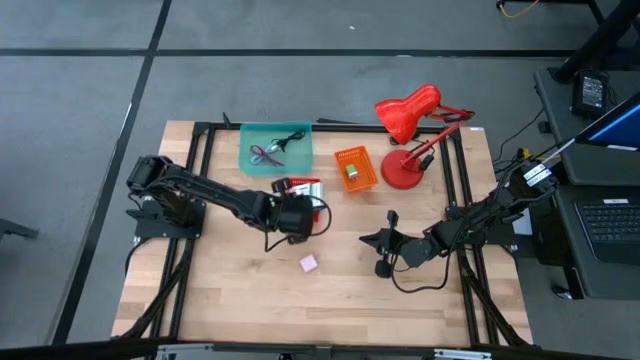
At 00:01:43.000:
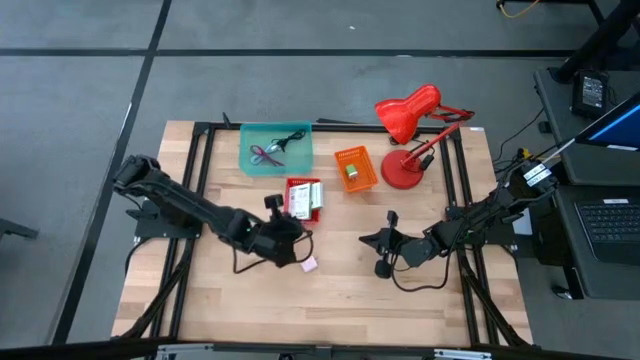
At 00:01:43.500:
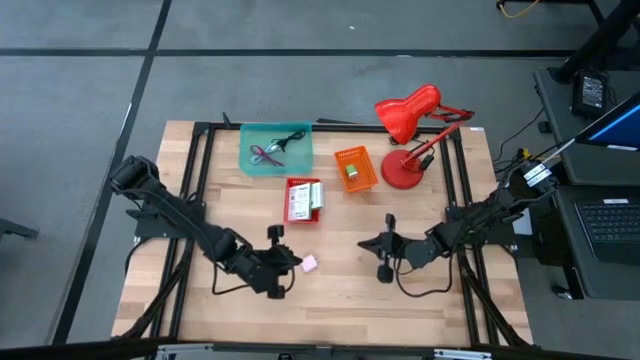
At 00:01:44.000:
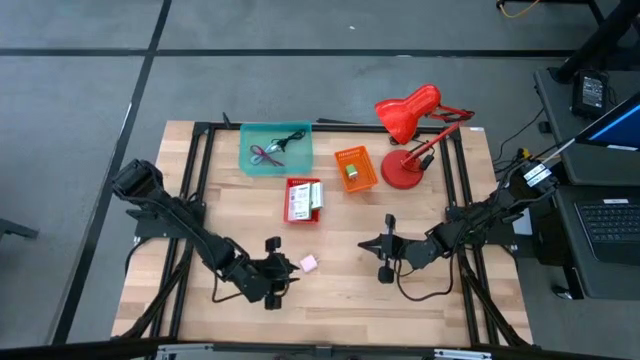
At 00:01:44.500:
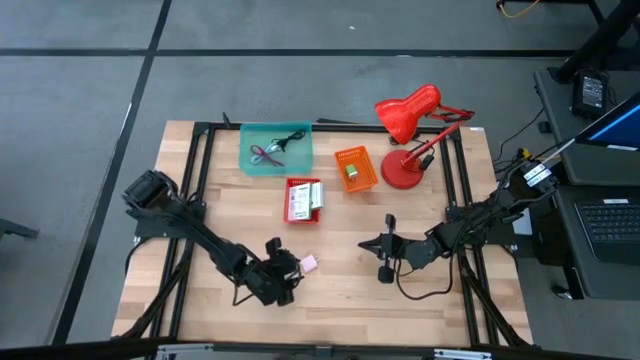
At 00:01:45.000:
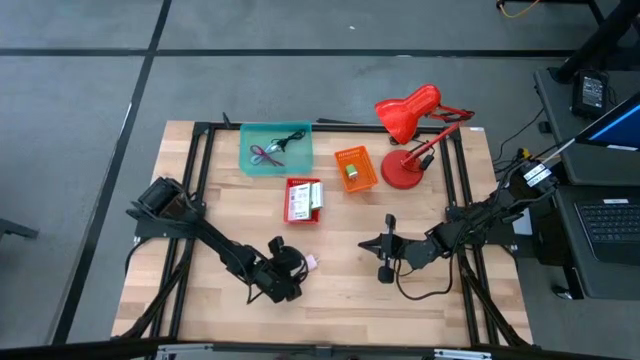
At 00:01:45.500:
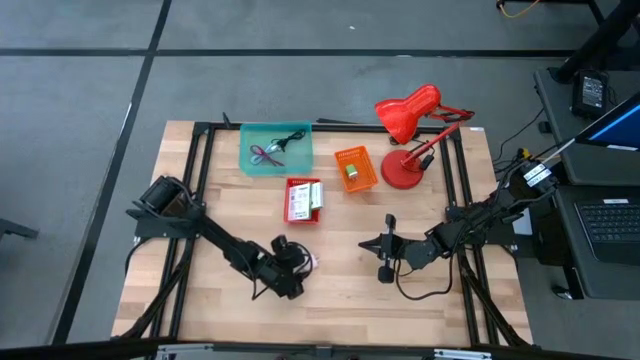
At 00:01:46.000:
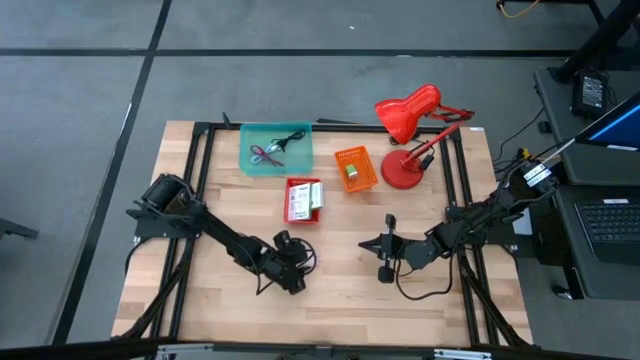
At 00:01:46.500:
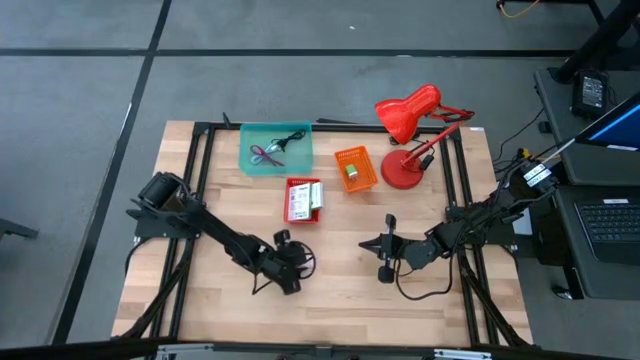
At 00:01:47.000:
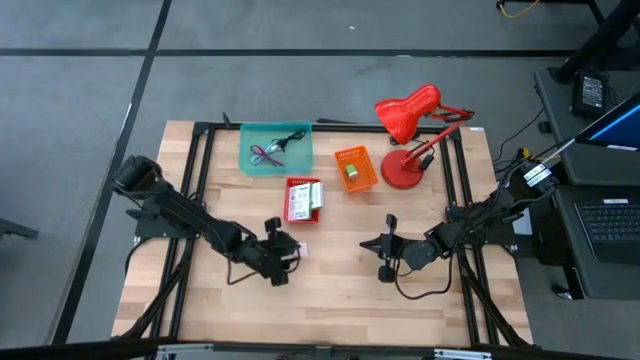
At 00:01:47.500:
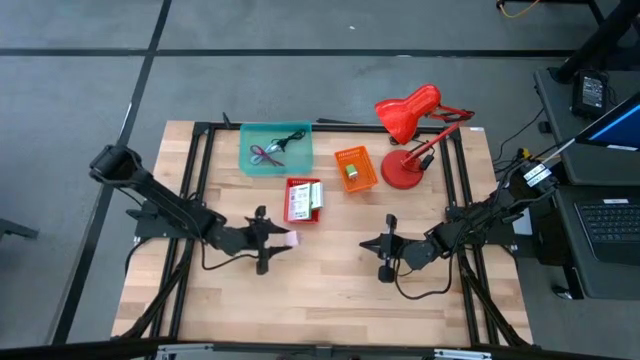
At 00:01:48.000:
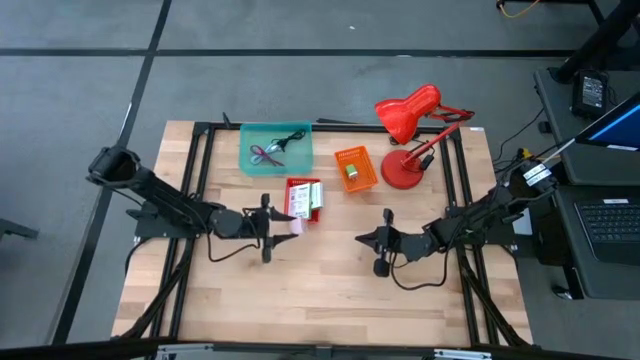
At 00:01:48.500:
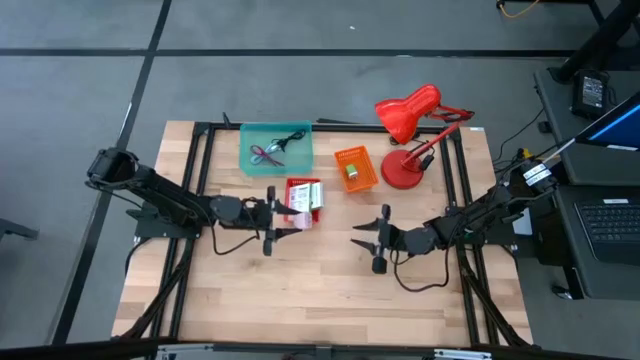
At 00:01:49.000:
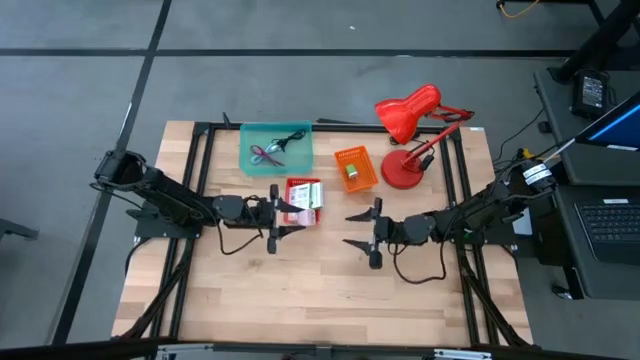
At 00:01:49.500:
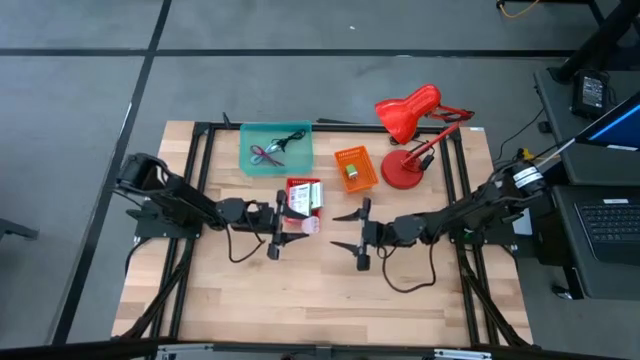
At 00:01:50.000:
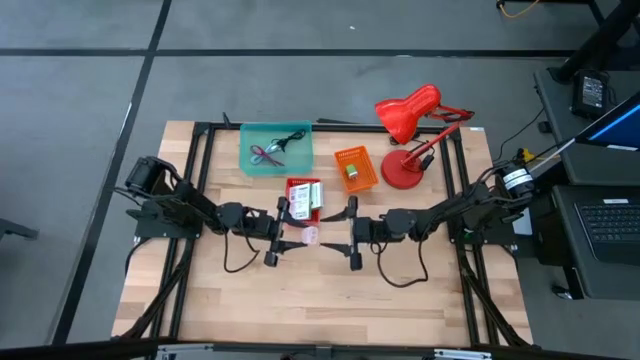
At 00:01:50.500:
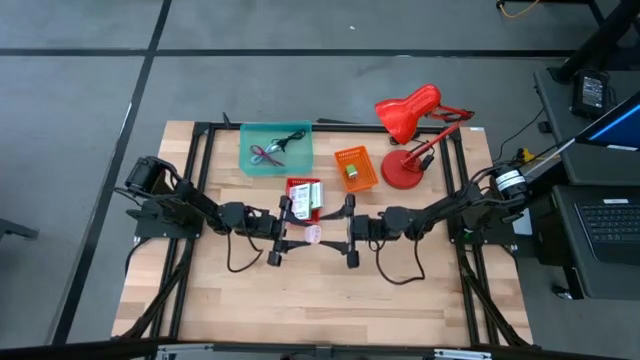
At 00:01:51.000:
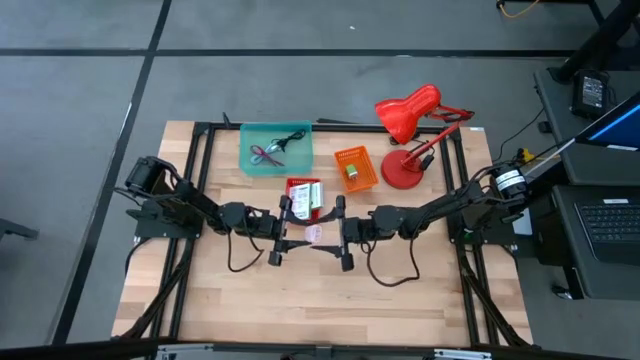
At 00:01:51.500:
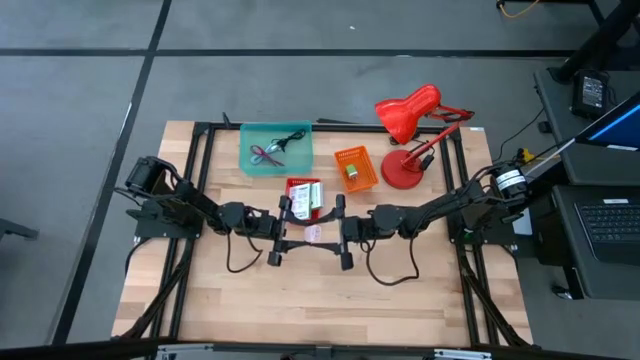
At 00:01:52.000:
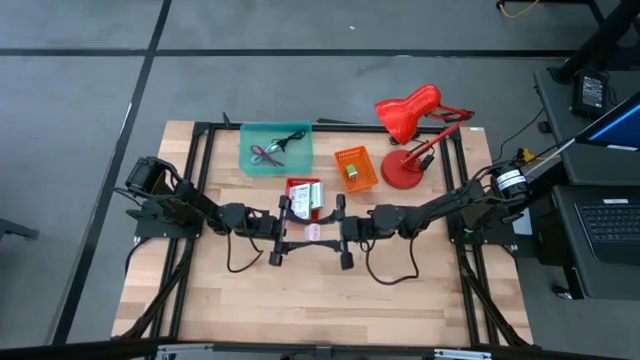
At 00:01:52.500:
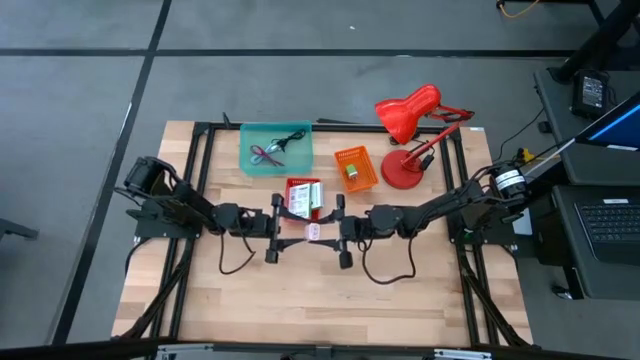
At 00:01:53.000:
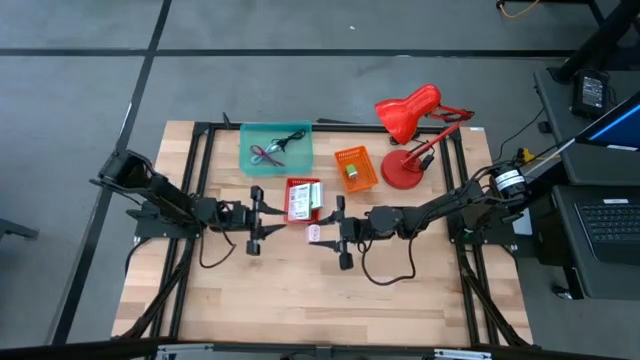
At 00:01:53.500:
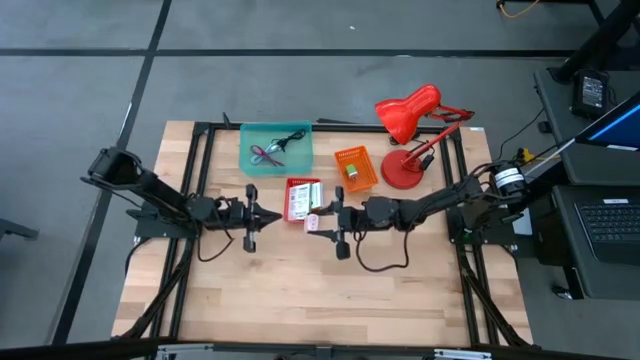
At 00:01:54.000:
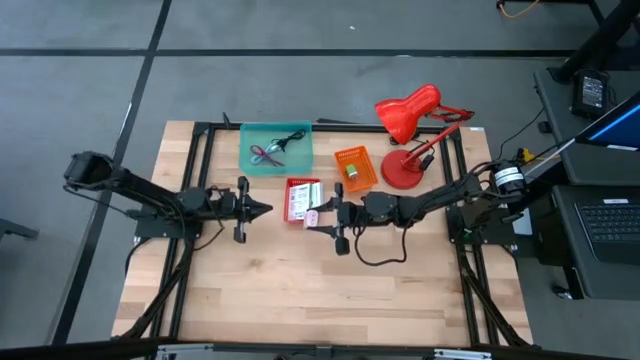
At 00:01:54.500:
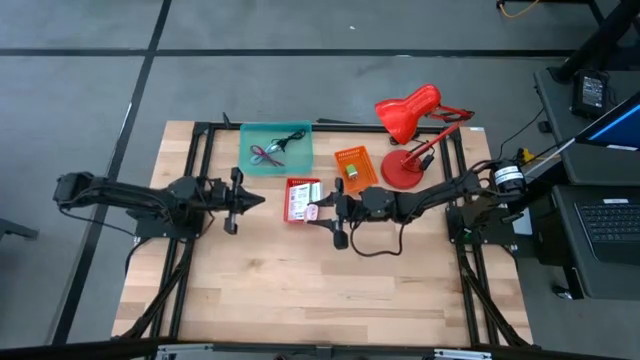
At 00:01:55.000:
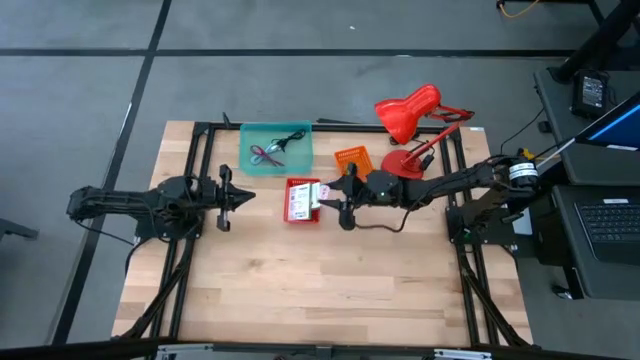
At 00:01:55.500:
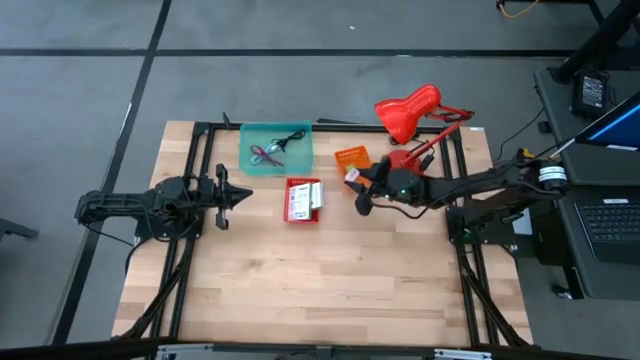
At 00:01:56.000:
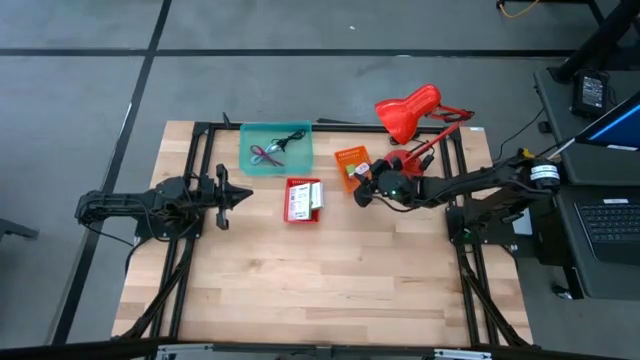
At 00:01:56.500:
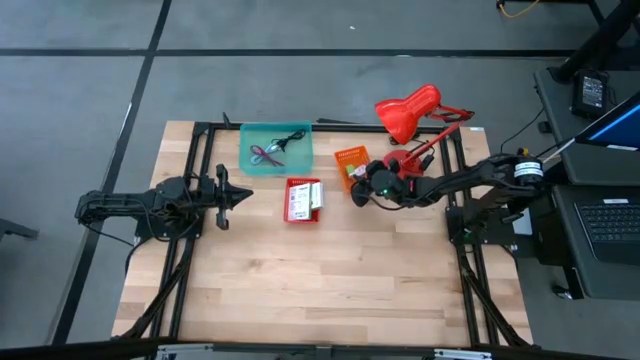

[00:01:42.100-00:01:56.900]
Task: Pick and place items into bin
Put the white charger adapter into the orange bin

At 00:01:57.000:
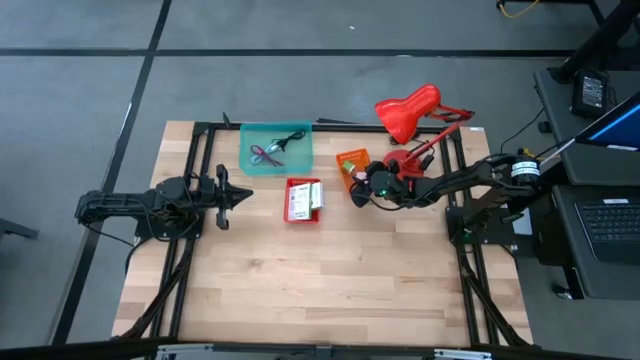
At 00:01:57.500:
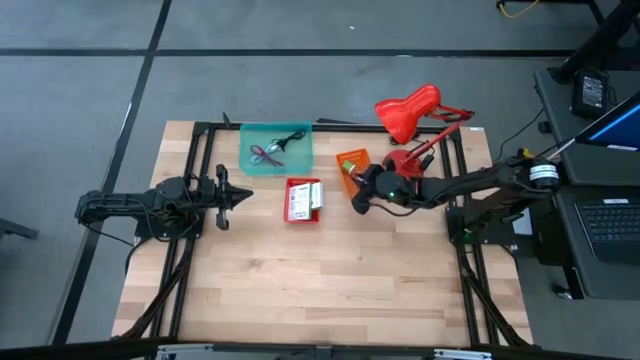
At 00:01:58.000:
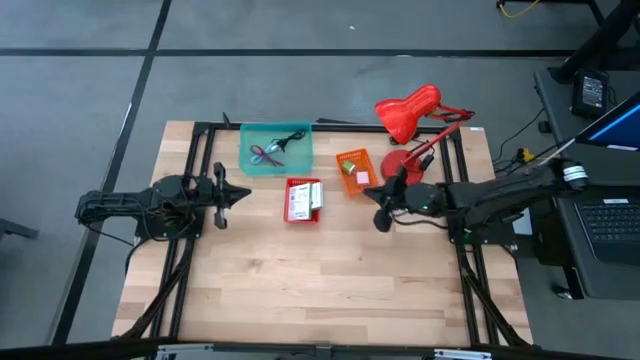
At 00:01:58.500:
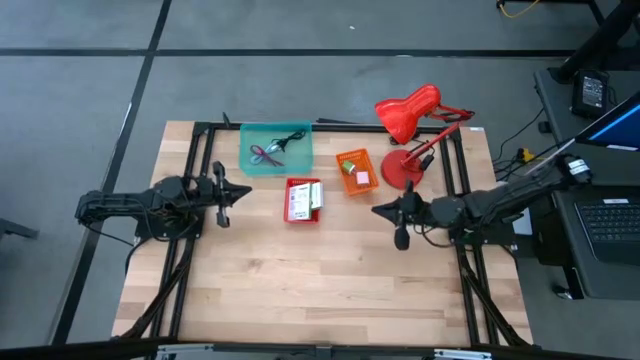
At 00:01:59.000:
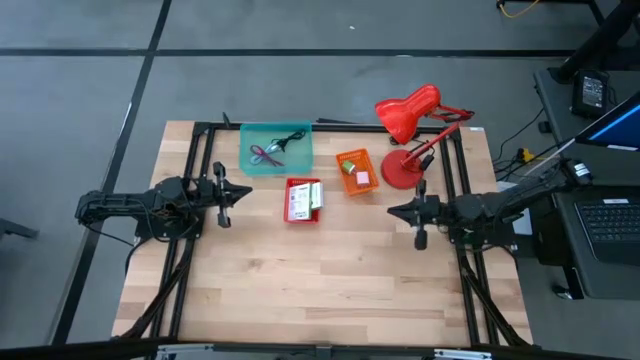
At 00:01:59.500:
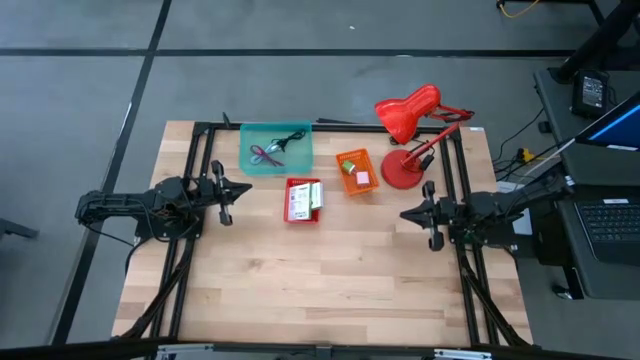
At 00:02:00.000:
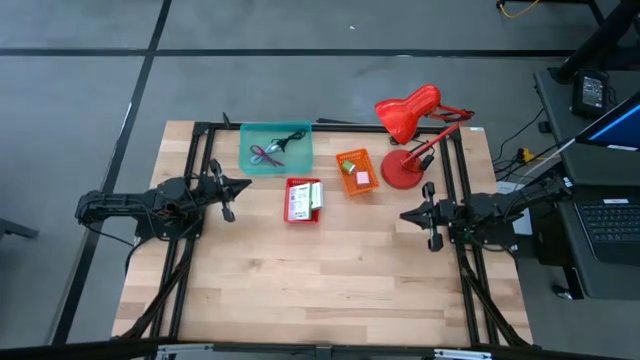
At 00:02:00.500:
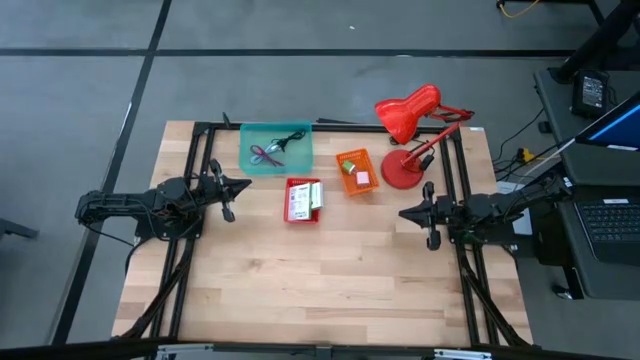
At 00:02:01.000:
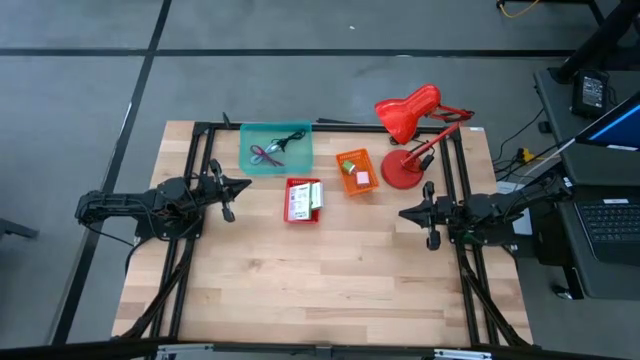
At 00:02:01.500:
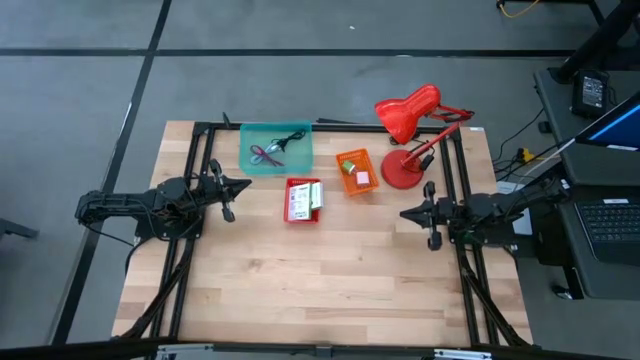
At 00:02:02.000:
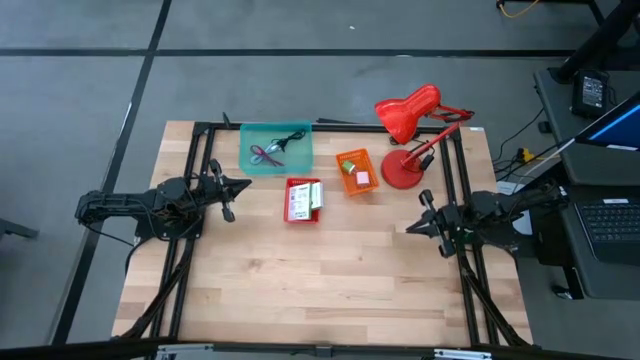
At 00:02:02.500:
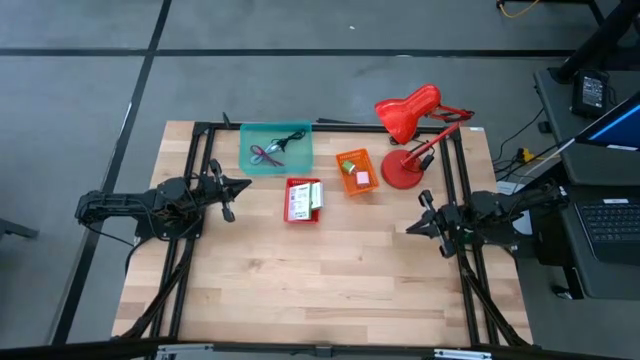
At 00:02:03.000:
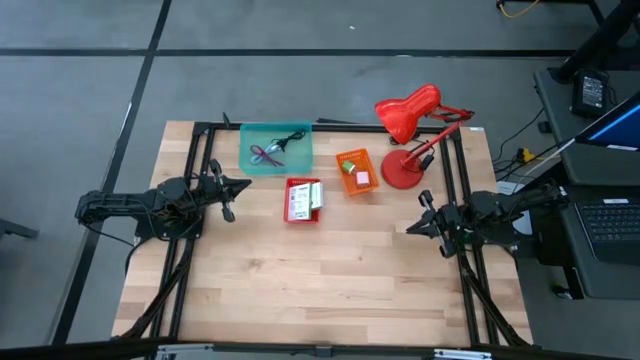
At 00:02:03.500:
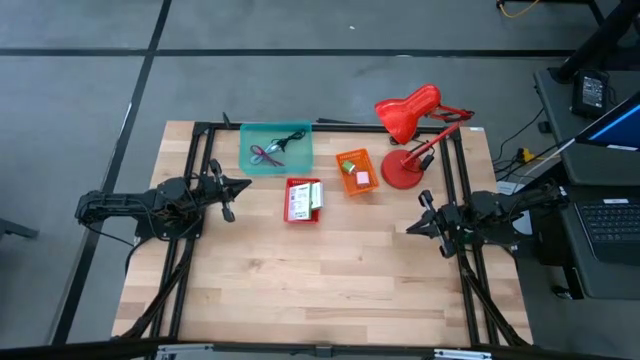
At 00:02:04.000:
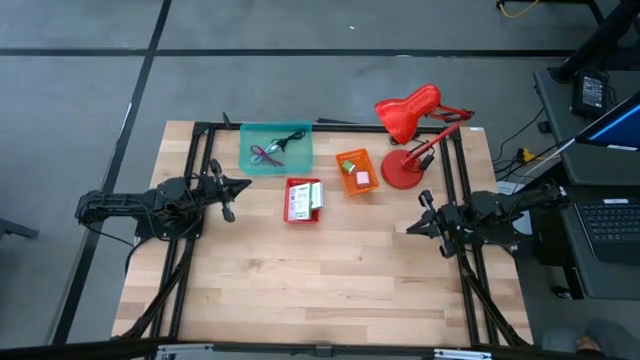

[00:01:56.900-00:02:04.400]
Return to Home Position
